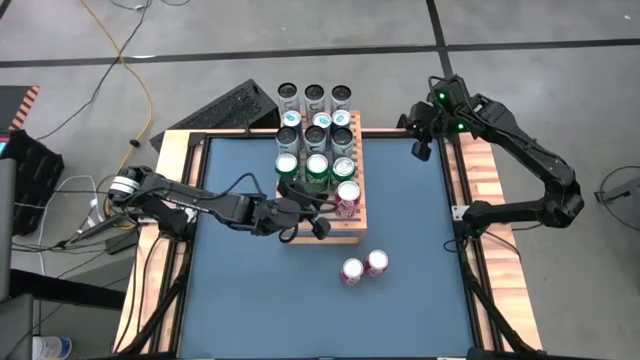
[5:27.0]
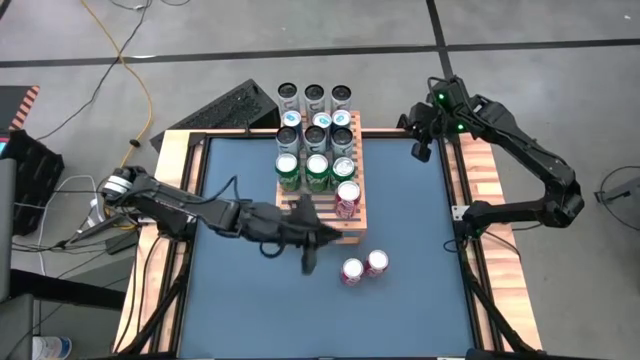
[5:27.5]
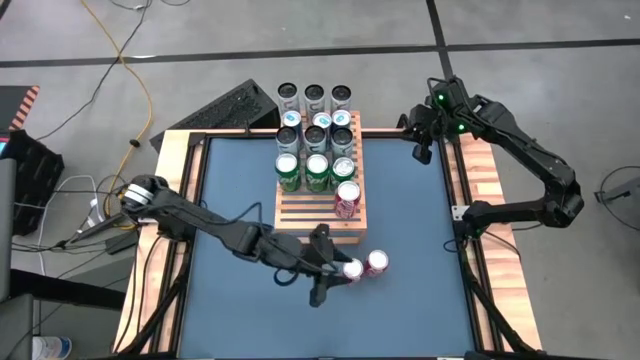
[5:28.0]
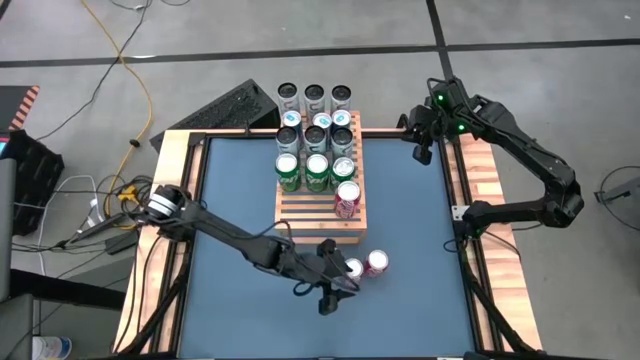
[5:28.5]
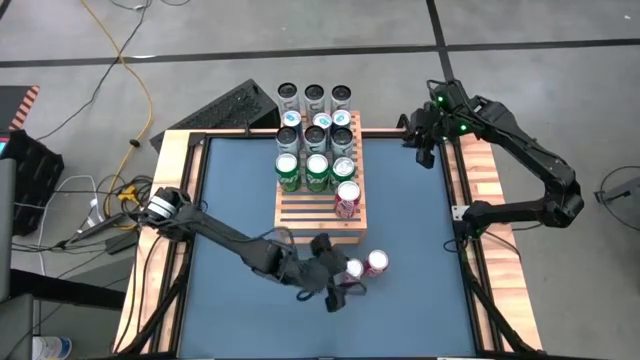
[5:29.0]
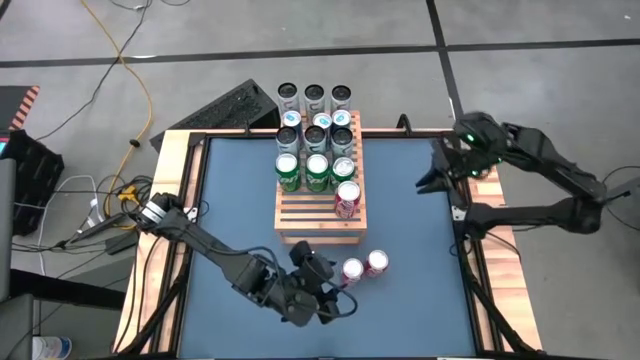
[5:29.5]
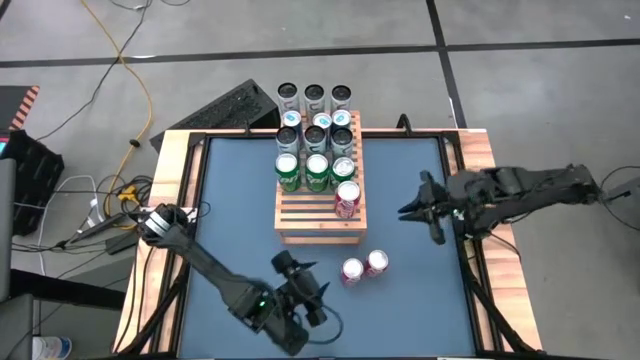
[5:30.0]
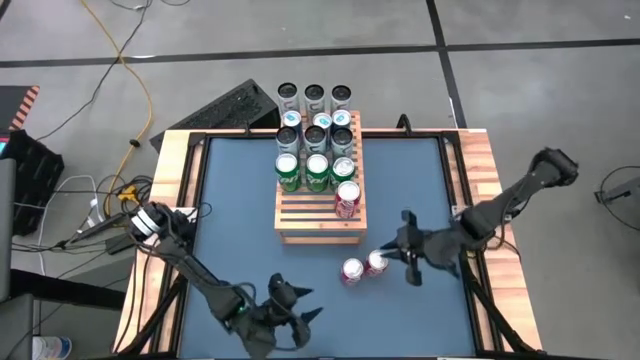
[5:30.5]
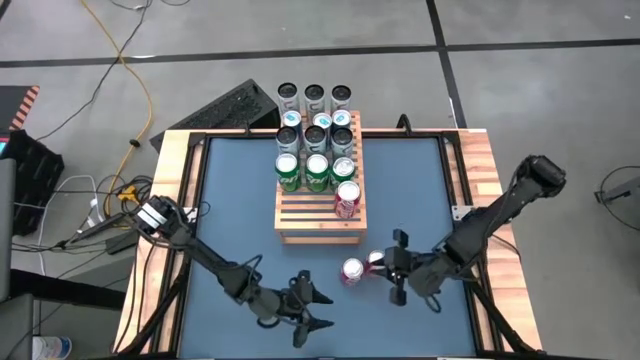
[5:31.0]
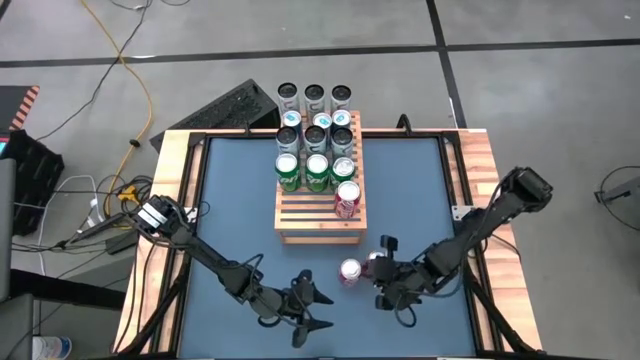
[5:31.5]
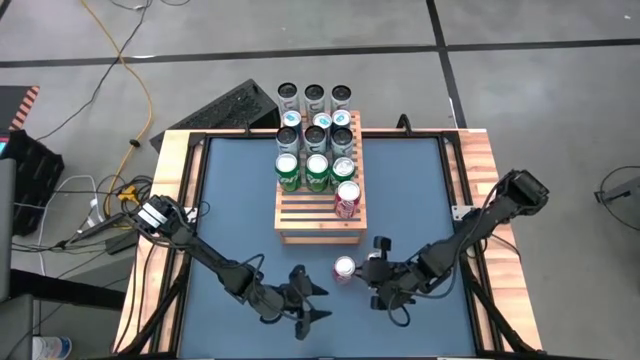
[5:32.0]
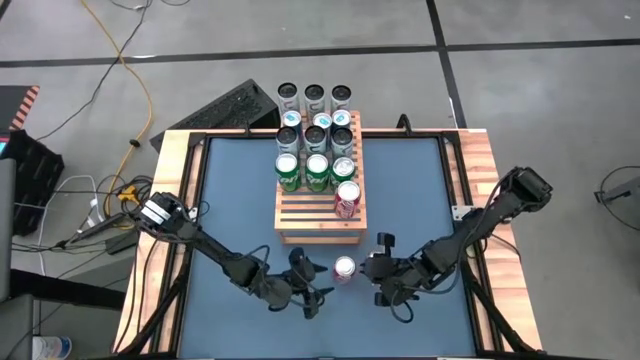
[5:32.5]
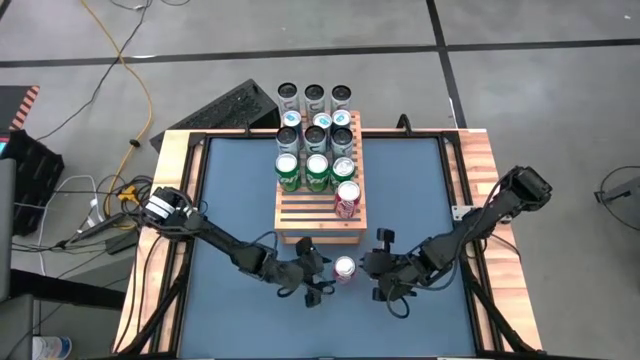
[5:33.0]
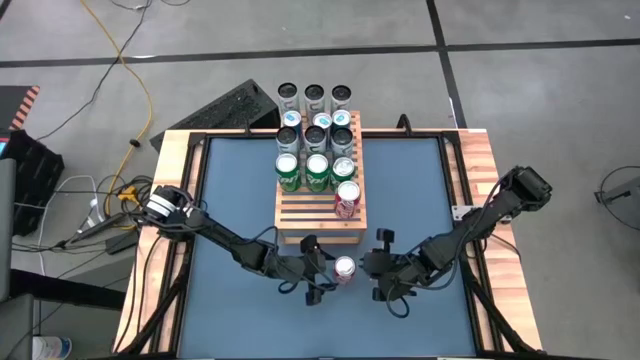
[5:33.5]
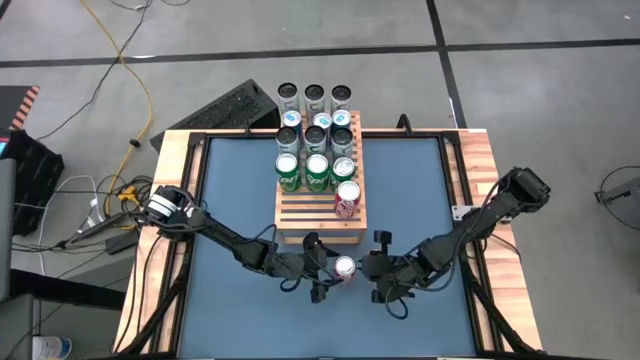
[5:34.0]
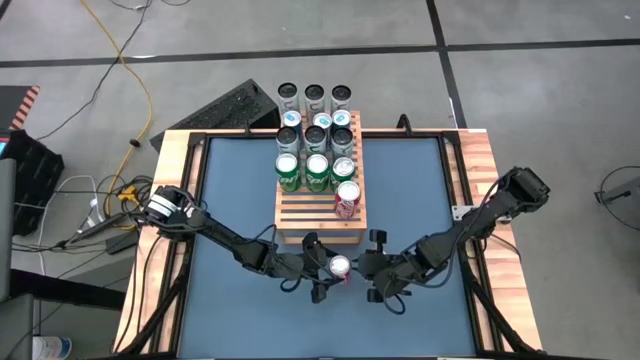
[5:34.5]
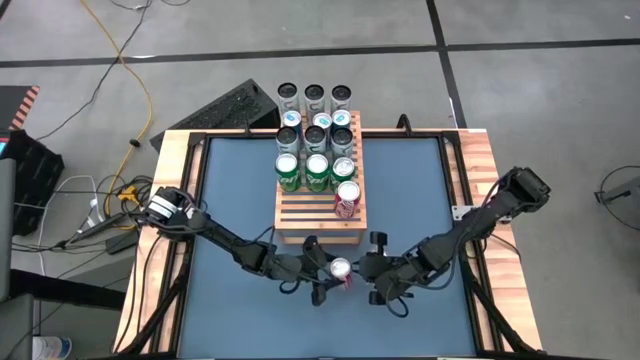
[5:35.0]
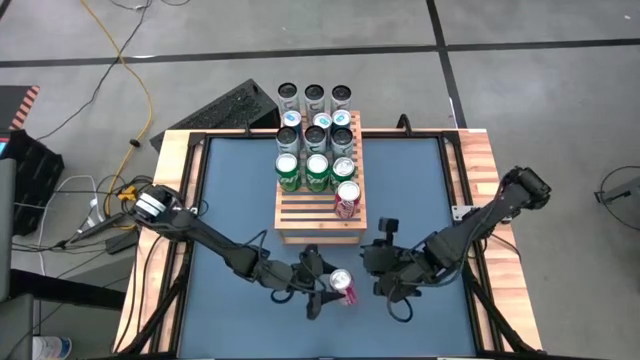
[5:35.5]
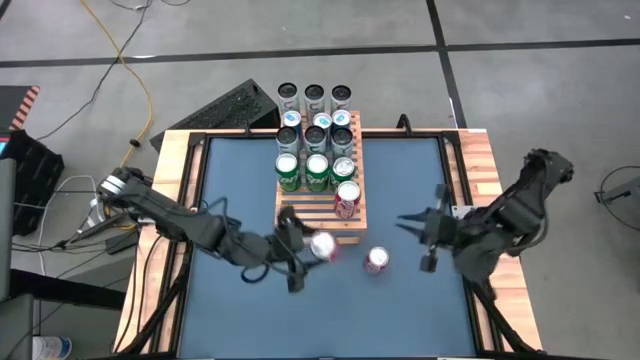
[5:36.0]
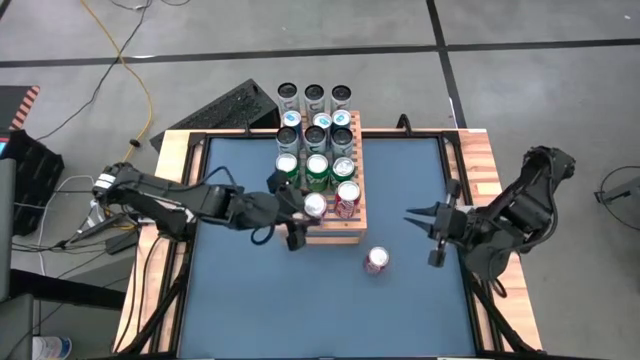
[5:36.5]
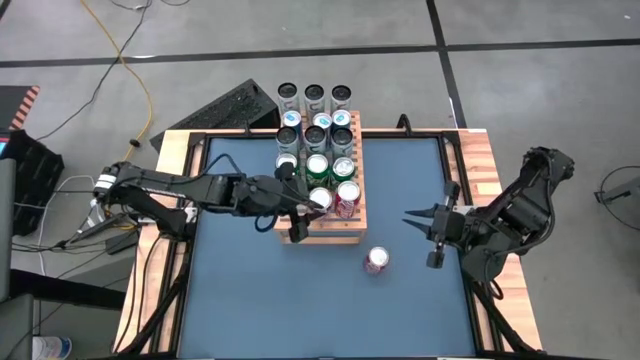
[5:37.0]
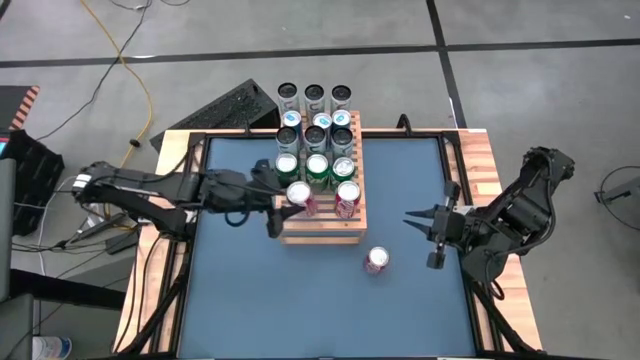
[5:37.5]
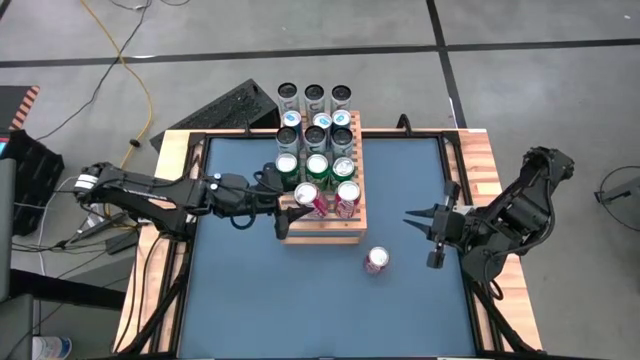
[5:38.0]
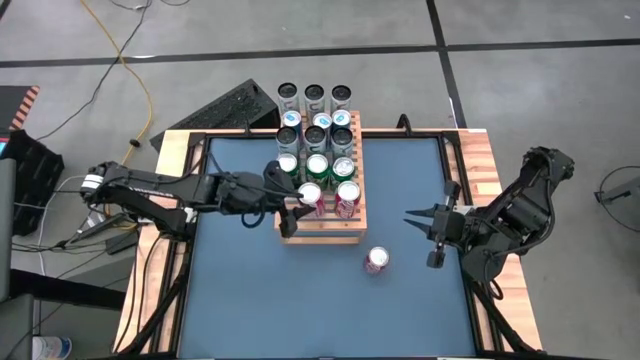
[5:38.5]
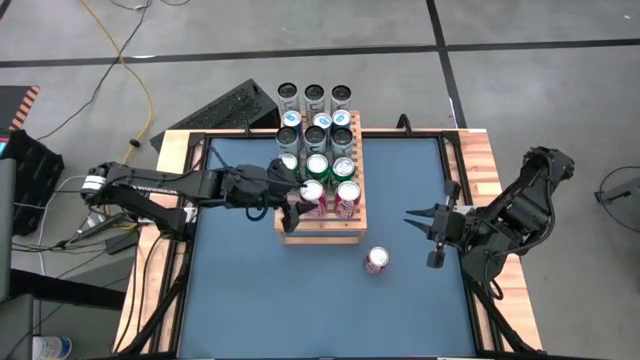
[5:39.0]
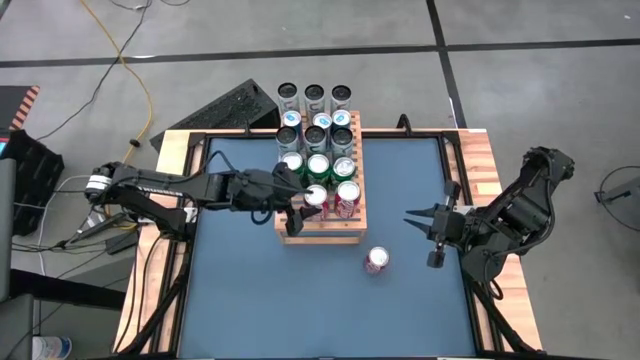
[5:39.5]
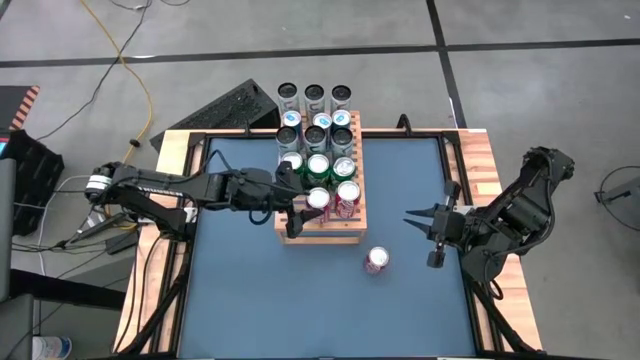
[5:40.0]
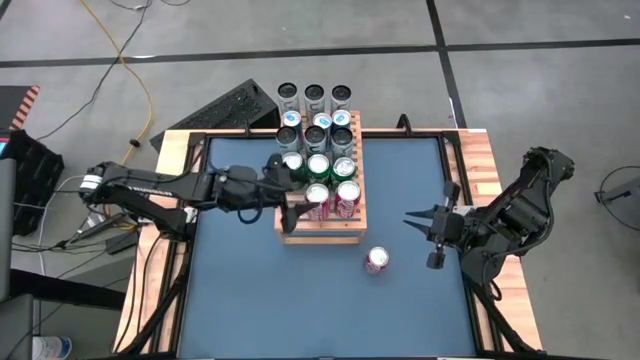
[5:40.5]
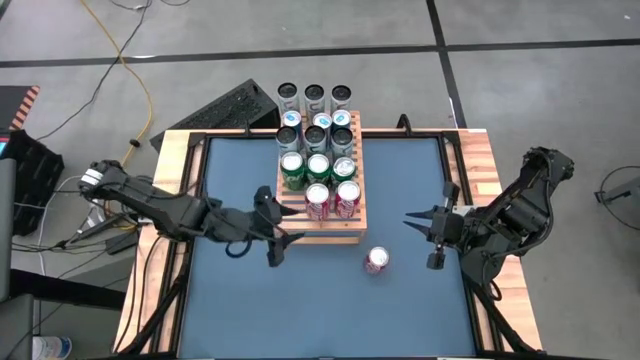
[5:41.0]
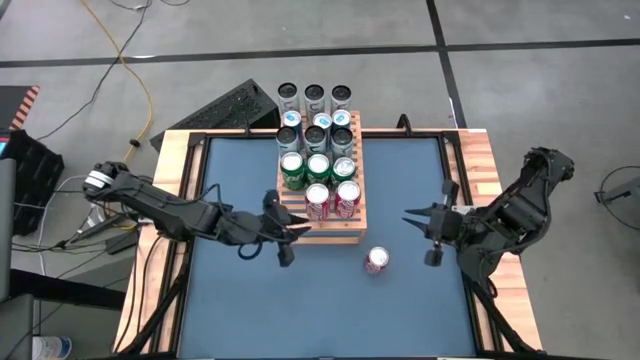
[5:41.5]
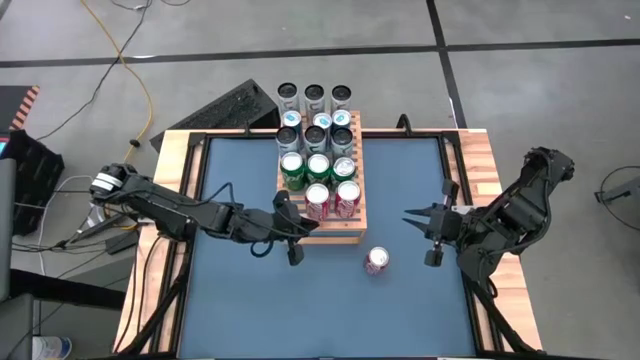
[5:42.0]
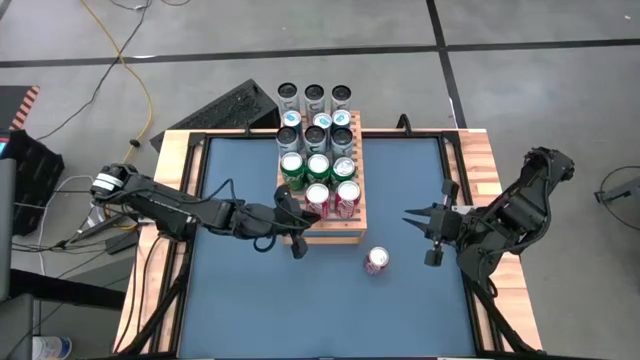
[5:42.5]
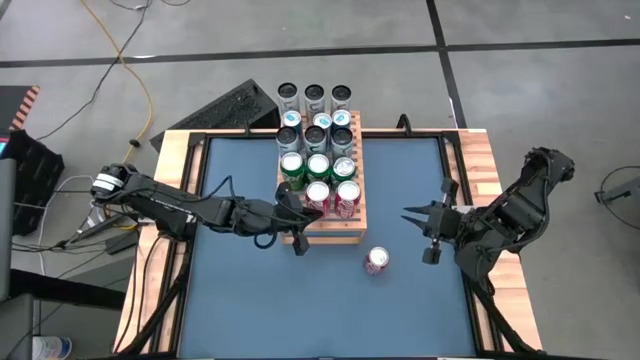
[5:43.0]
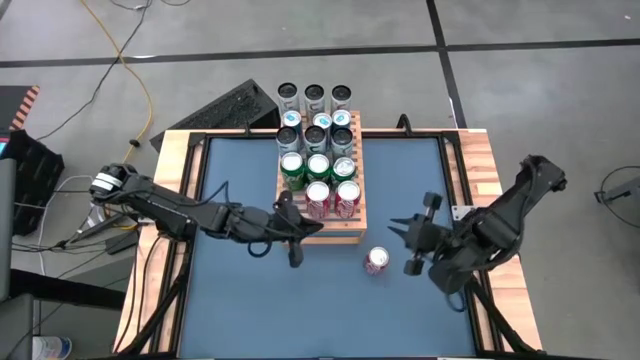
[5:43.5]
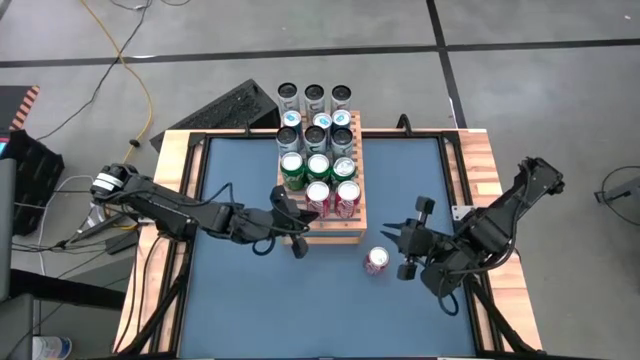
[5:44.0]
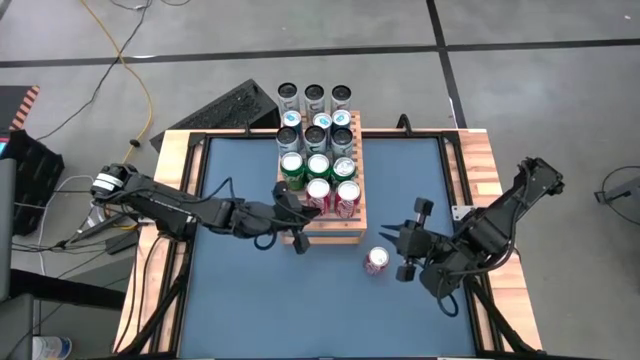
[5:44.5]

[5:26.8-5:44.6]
Task: Place canned beverage on shelf
Put the left red soda can on the shelf aligned with the other red soda can
